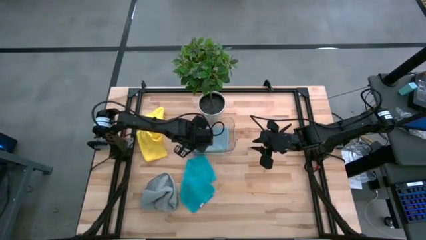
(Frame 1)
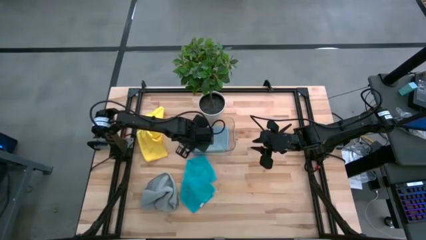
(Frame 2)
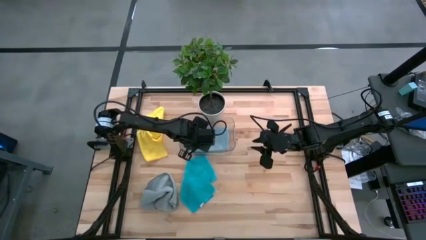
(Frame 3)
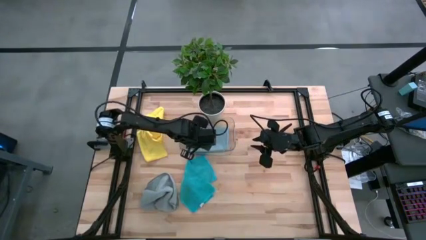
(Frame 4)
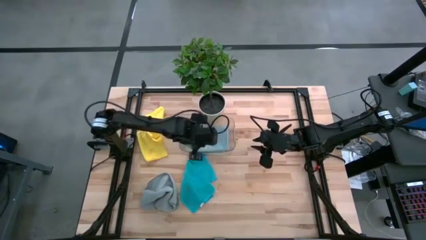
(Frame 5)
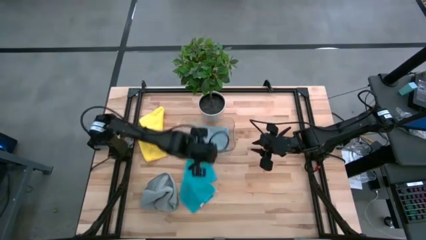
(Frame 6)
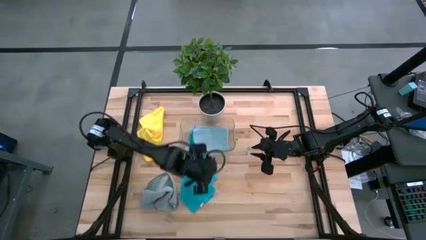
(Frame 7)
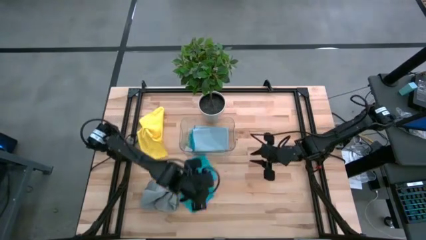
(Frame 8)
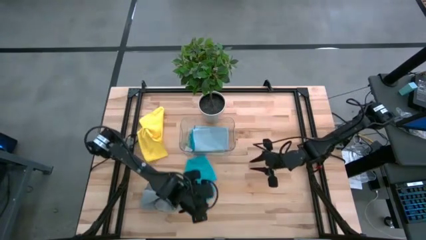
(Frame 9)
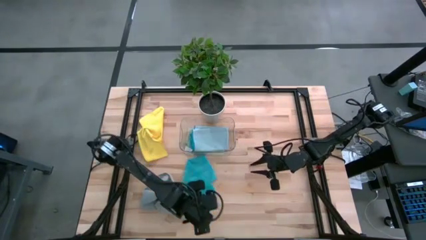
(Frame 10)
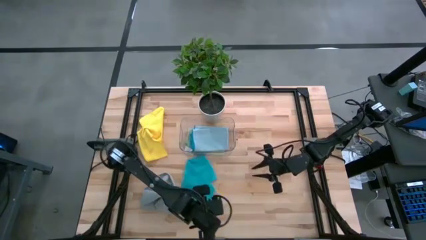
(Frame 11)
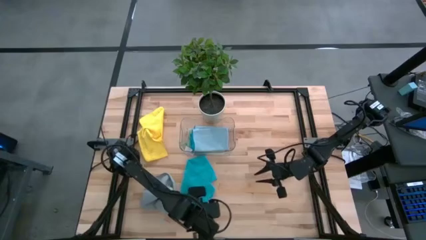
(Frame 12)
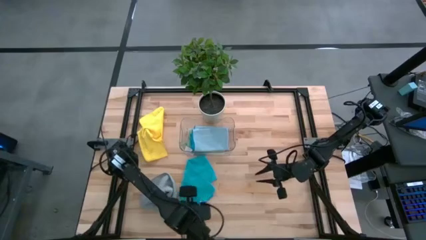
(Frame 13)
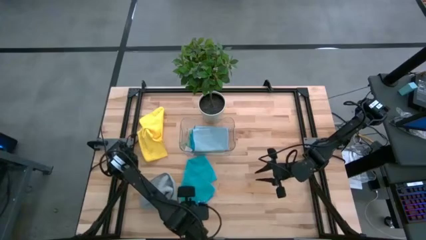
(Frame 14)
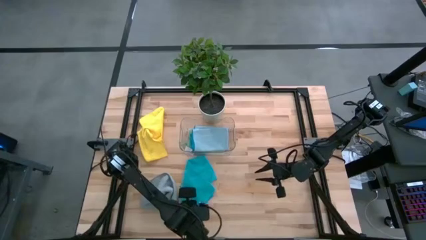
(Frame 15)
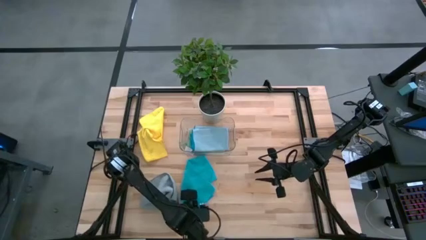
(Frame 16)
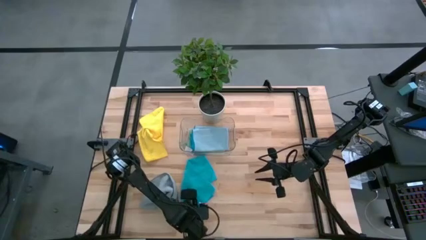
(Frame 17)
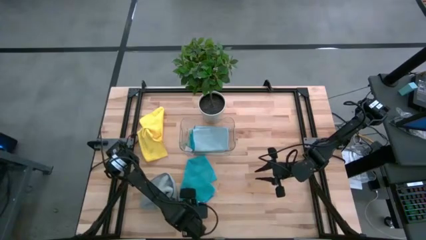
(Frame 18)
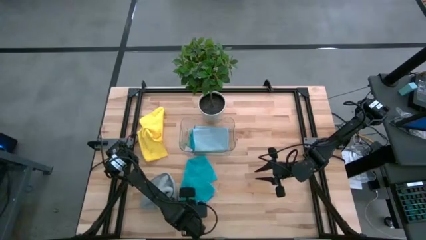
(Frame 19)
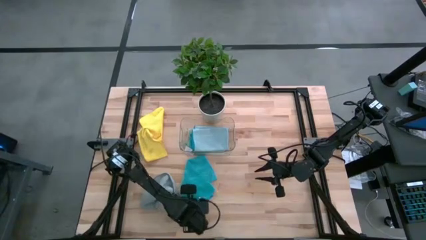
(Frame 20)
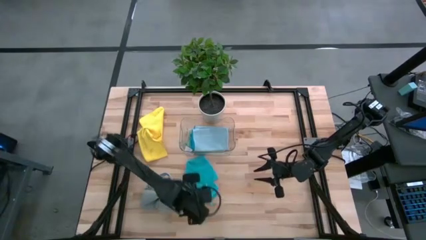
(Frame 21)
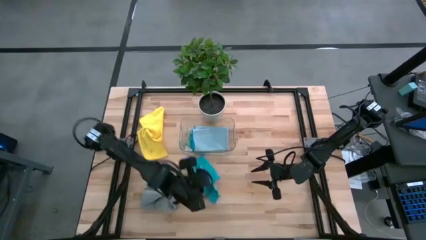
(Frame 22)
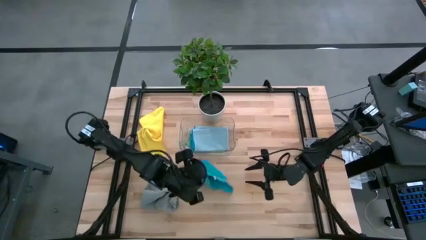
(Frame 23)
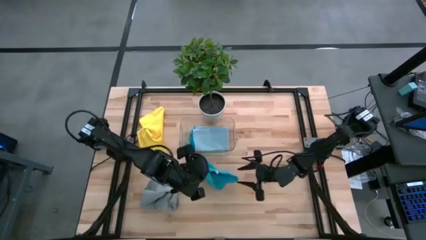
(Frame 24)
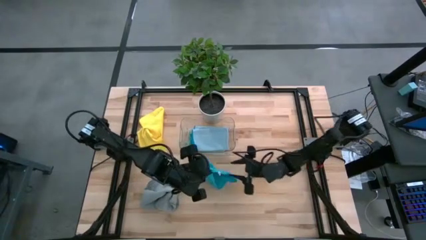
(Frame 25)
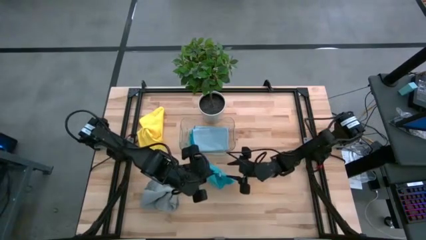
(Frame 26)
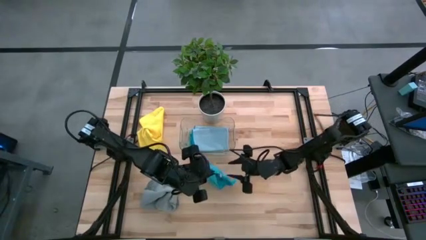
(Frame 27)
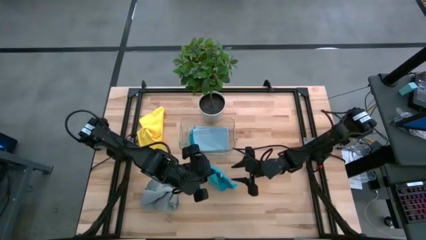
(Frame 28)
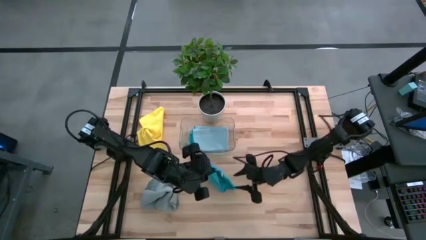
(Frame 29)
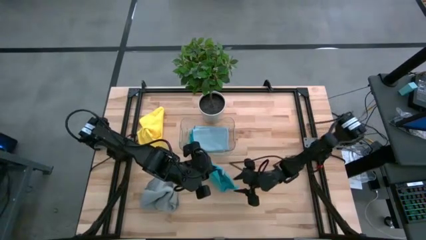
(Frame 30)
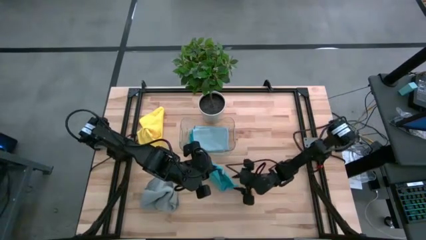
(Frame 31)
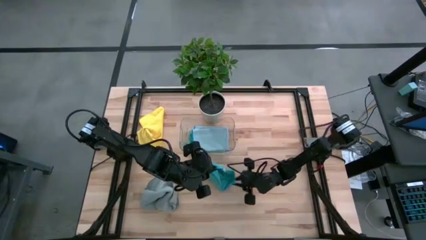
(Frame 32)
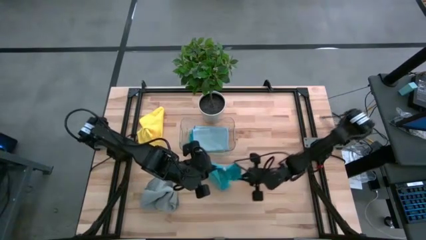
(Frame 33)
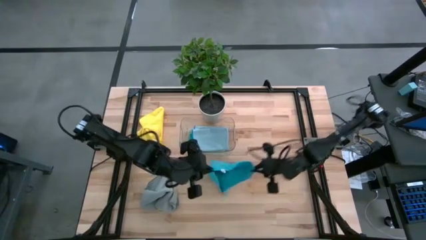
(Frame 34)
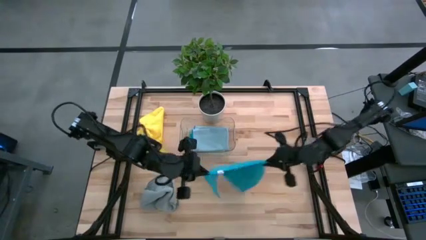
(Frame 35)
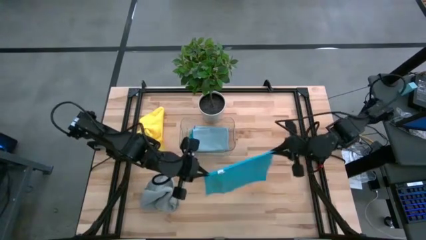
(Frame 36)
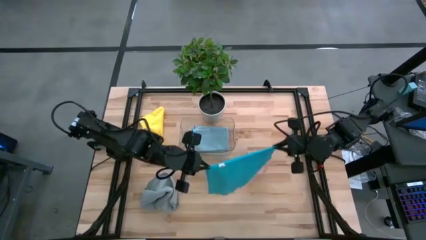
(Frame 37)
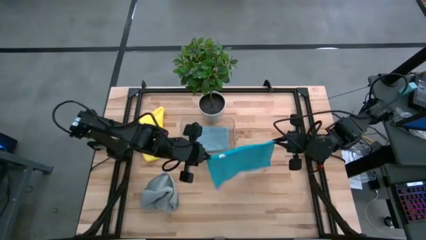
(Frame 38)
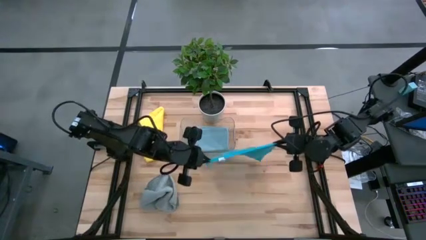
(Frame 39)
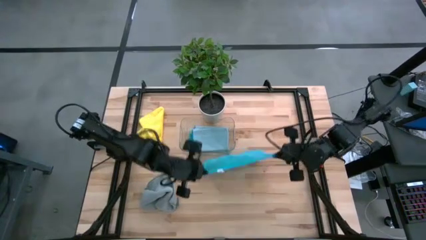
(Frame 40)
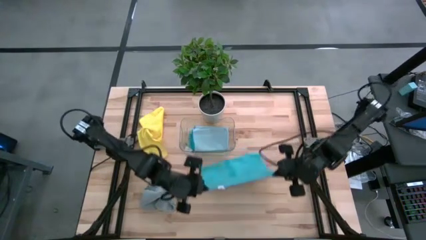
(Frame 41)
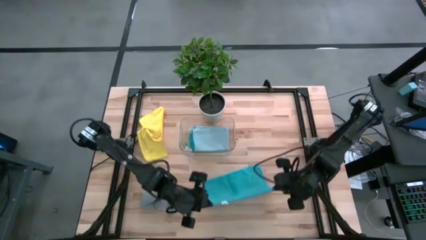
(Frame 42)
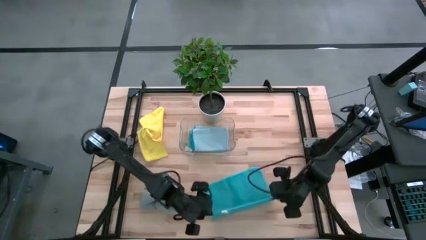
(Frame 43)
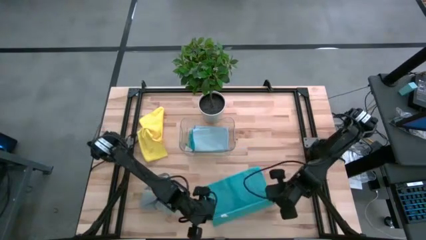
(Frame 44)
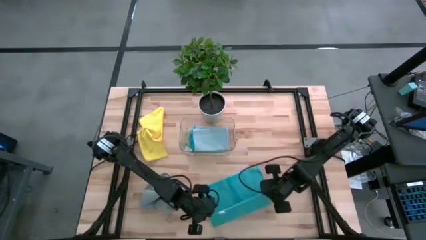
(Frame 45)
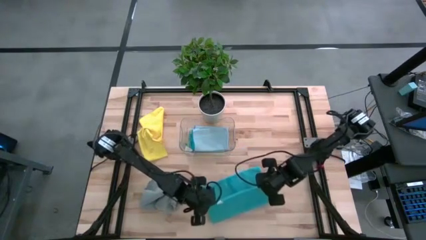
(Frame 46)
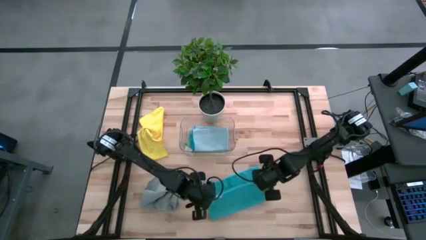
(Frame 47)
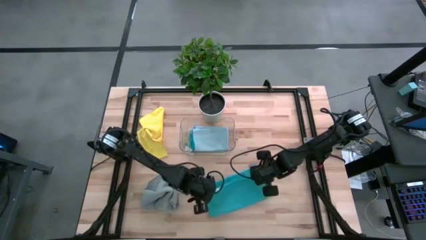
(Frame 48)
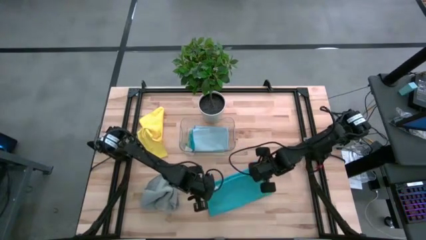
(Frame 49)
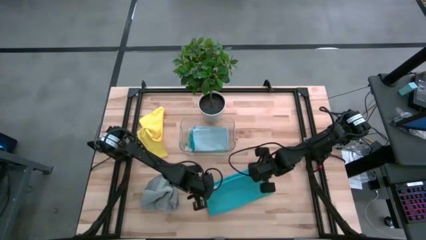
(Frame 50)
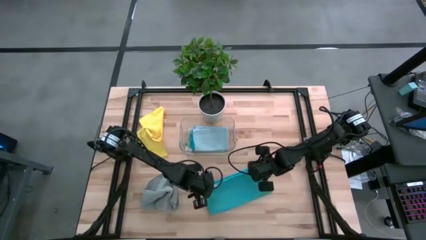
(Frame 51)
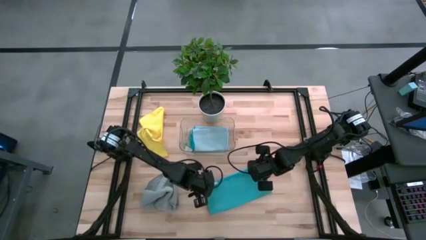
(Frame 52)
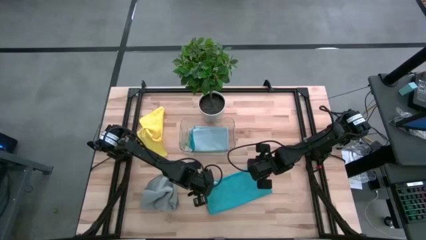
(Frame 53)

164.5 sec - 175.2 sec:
Task: Fold microfiber towels
Fold the blue microfiber cloth
